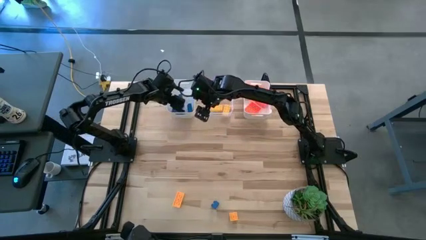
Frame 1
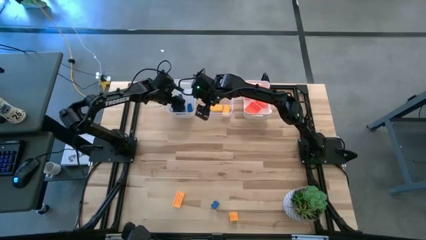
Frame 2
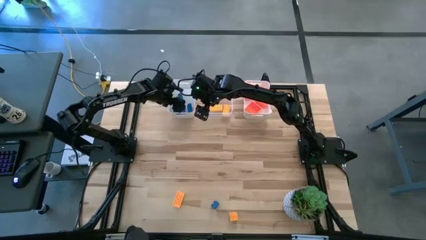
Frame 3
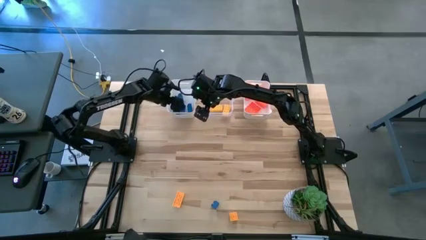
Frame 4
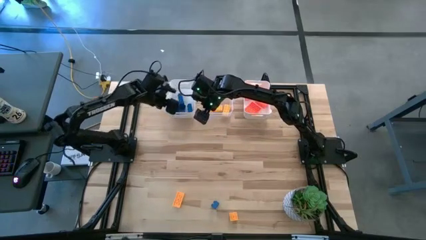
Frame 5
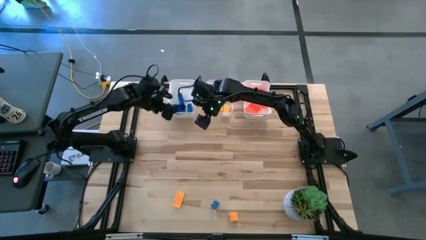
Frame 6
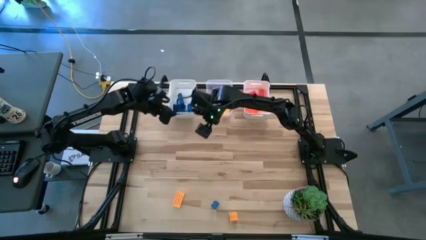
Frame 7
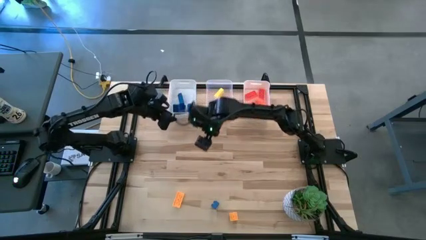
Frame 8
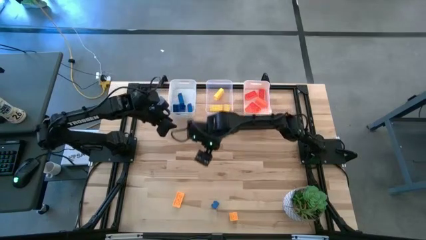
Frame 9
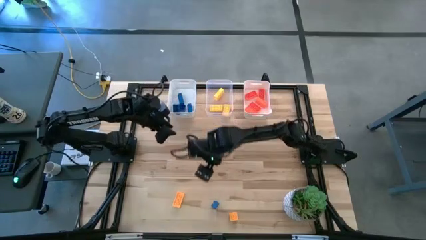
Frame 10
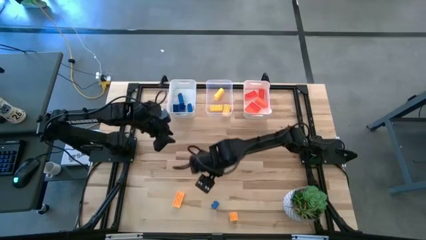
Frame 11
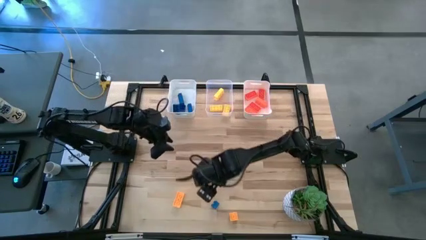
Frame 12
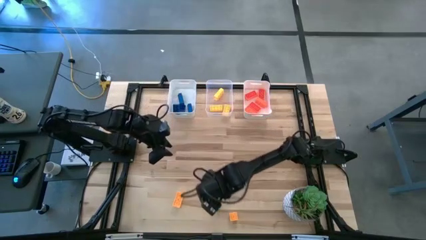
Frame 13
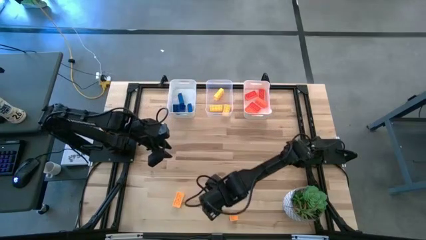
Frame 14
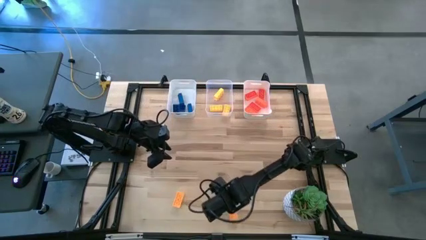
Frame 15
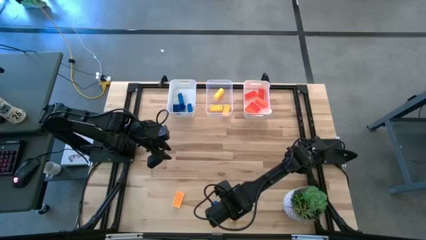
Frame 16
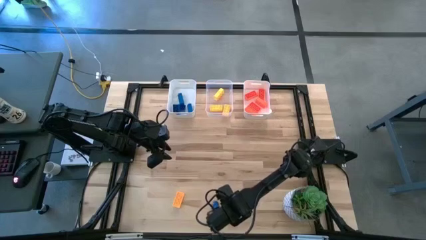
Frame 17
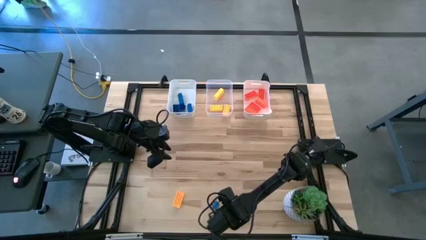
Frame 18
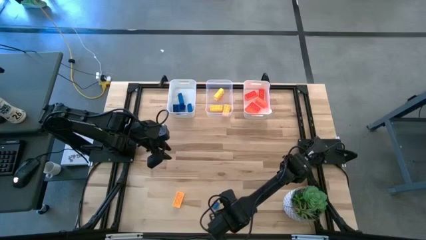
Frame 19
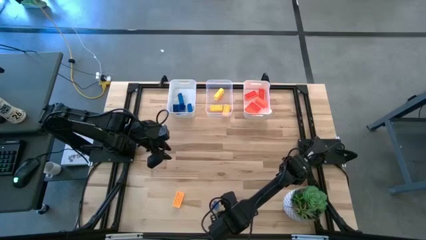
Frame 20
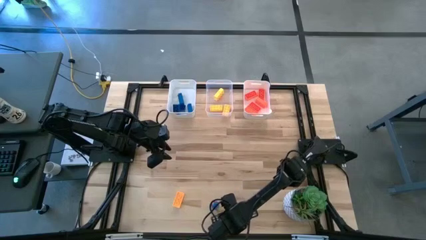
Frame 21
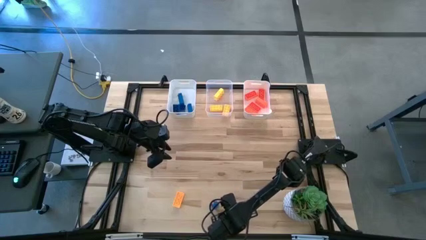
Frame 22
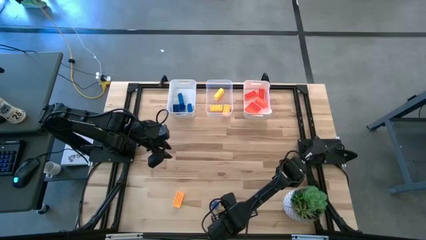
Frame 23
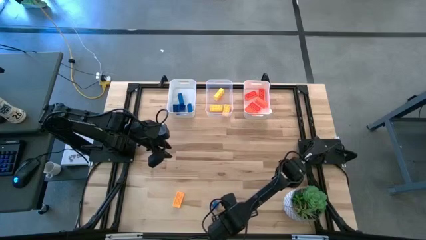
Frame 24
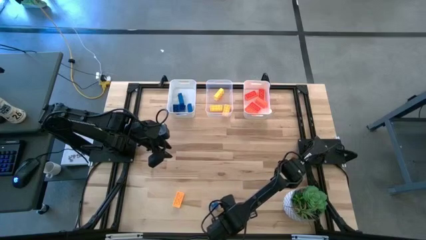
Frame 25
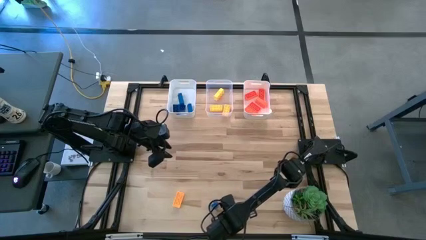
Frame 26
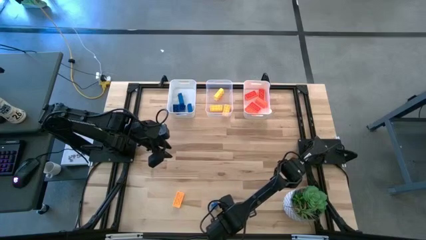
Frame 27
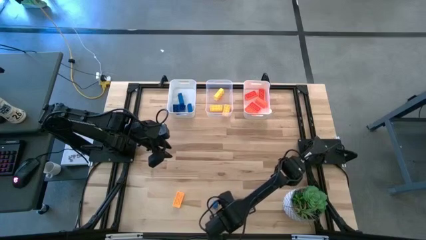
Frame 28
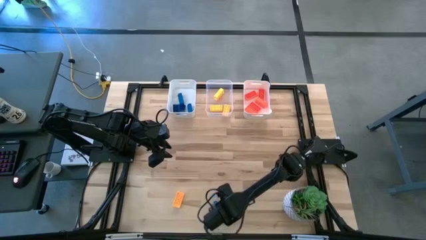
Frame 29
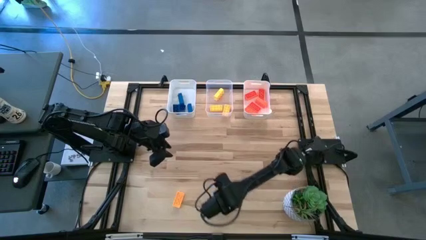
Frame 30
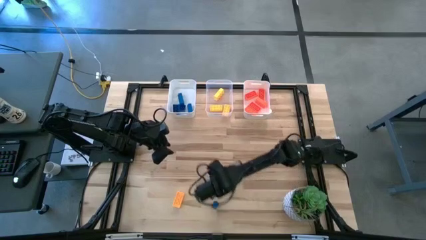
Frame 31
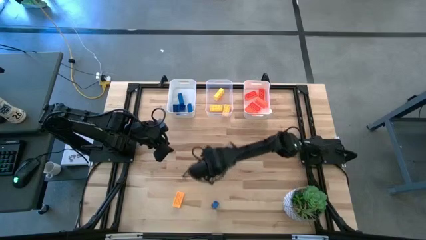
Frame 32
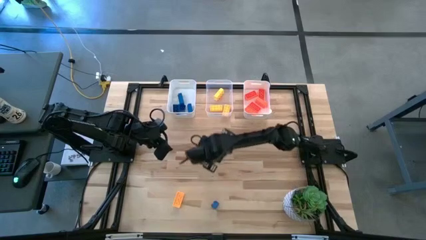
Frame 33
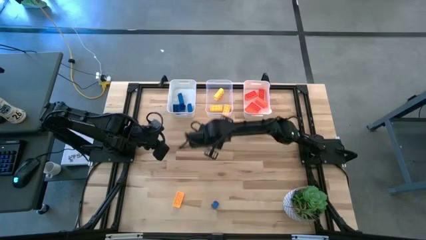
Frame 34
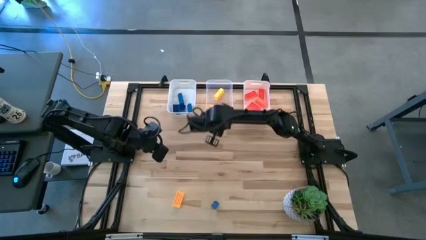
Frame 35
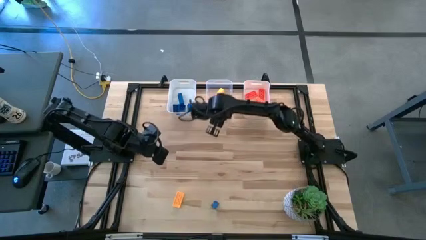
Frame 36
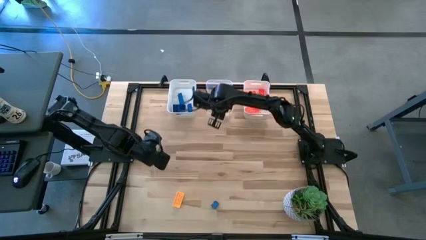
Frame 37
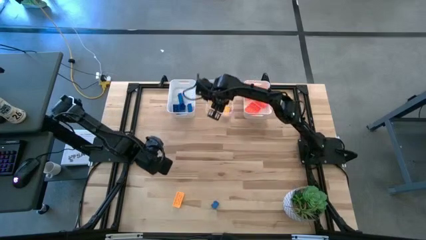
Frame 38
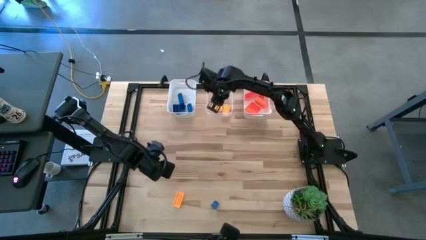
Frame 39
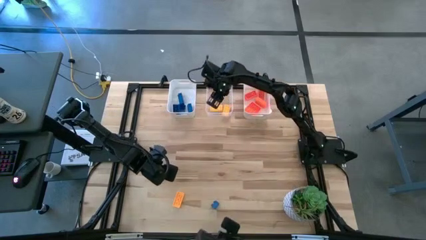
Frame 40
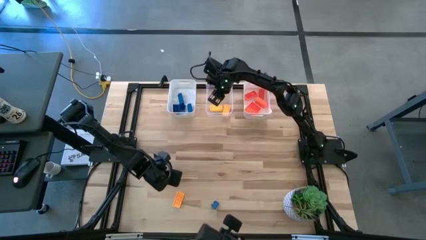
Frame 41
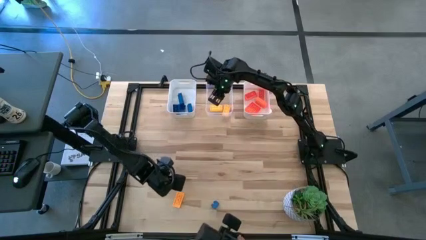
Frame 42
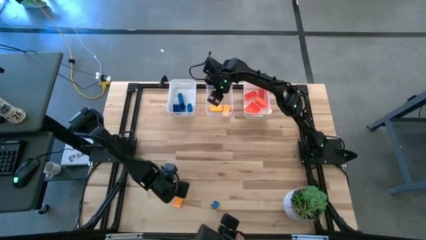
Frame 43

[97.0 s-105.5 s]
Task: Sort & place blocks by color
Put the yellow game piece into the transparent bin

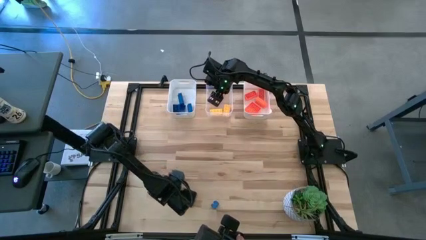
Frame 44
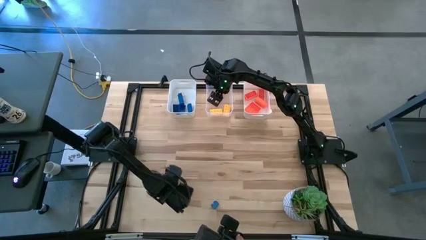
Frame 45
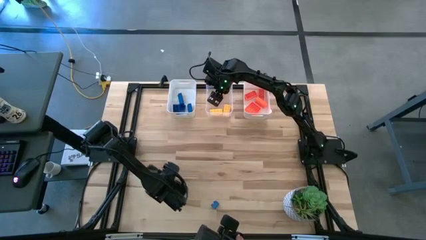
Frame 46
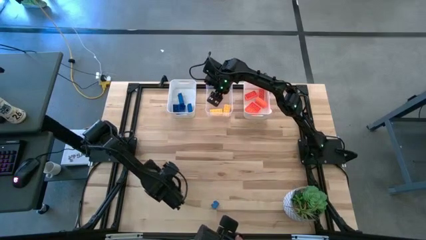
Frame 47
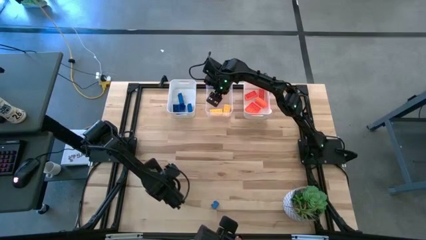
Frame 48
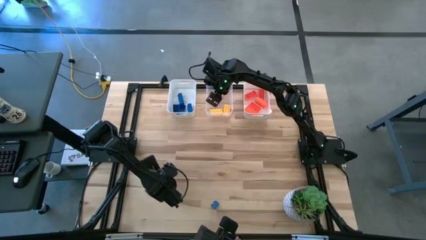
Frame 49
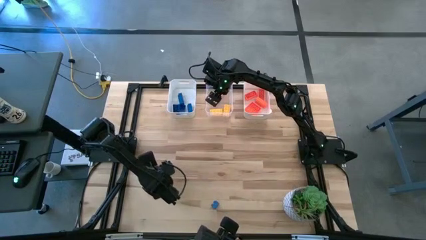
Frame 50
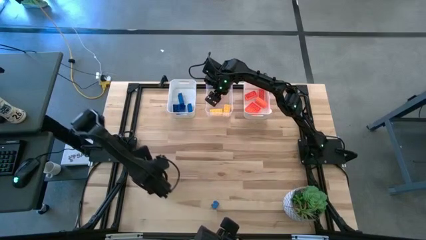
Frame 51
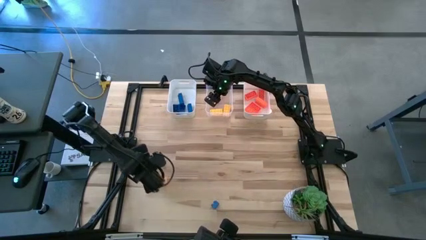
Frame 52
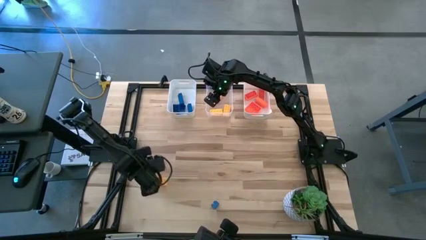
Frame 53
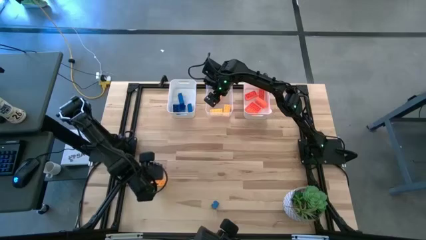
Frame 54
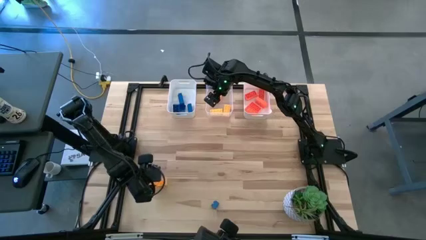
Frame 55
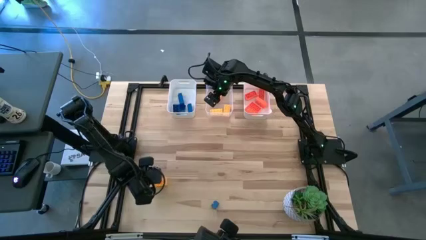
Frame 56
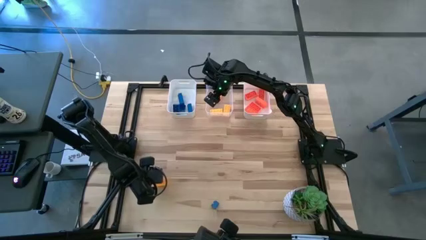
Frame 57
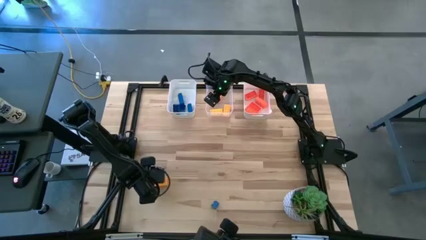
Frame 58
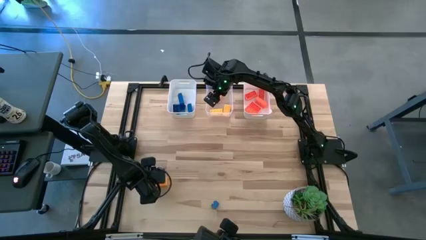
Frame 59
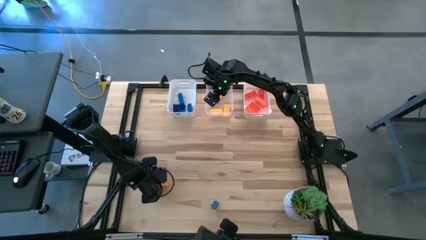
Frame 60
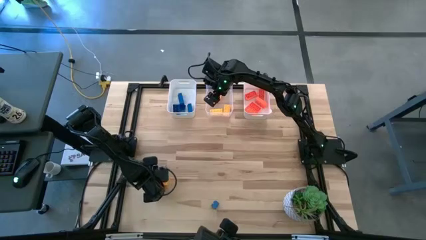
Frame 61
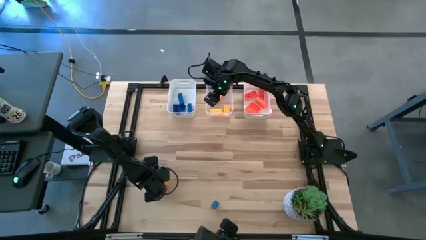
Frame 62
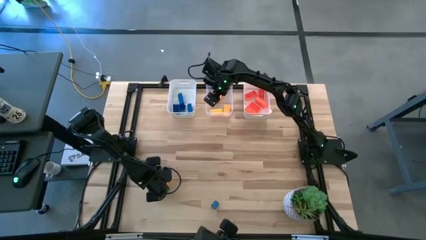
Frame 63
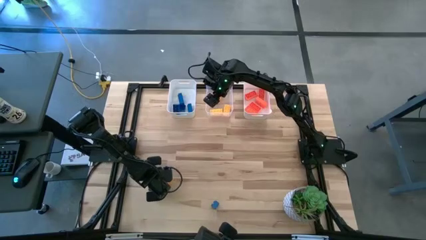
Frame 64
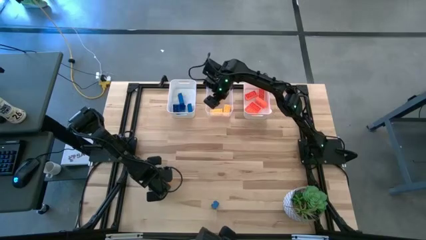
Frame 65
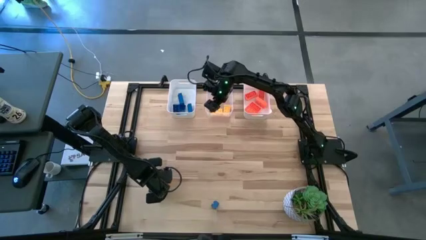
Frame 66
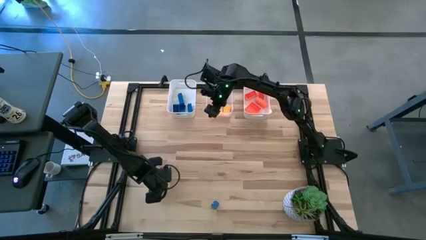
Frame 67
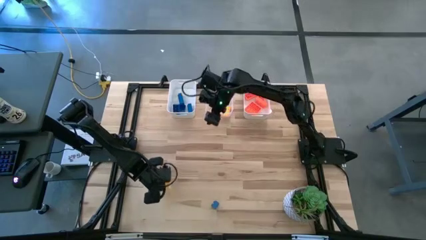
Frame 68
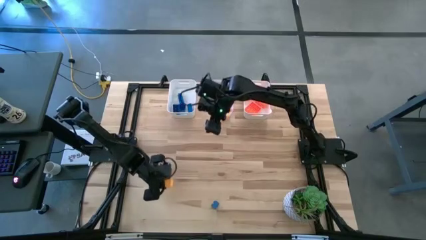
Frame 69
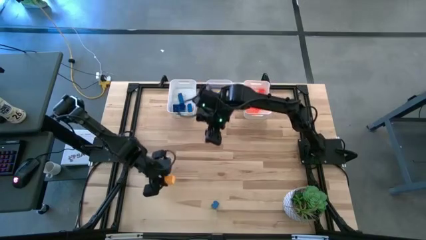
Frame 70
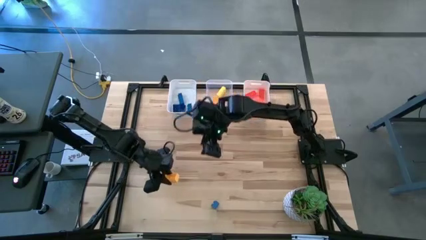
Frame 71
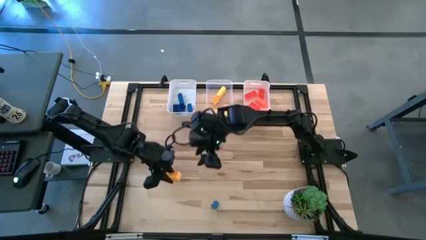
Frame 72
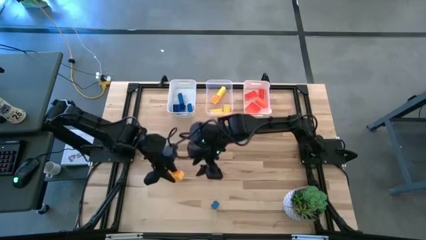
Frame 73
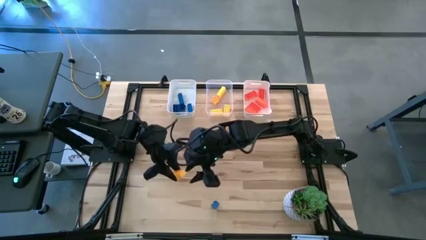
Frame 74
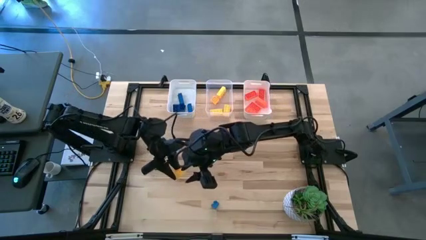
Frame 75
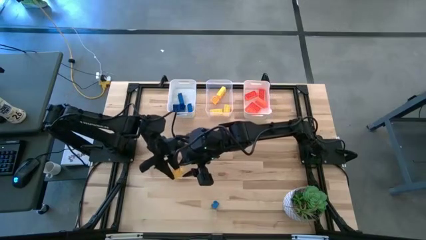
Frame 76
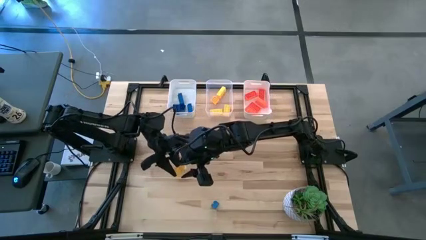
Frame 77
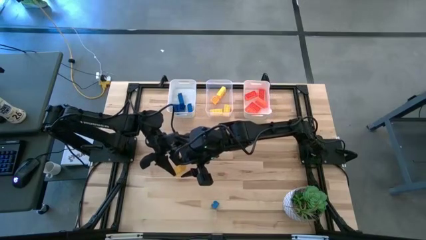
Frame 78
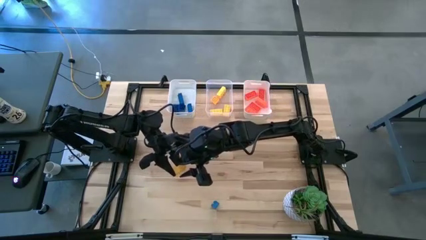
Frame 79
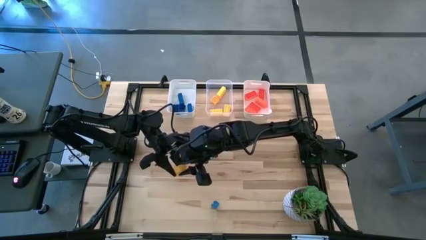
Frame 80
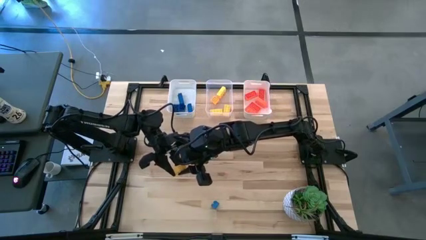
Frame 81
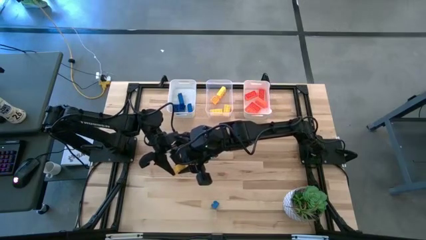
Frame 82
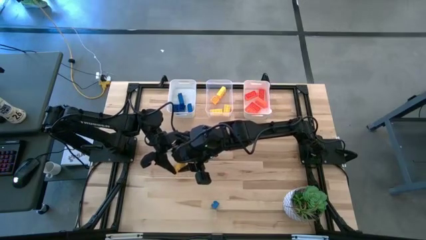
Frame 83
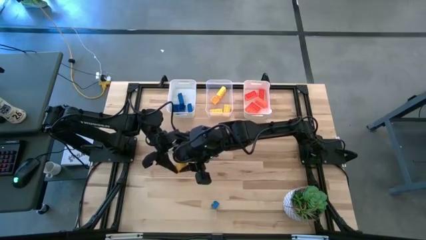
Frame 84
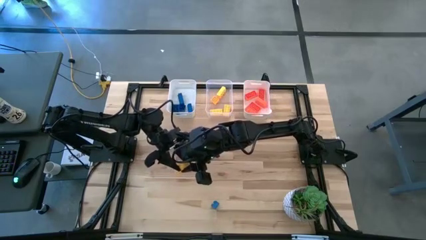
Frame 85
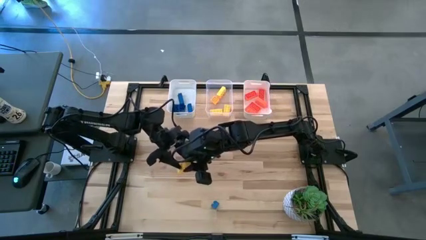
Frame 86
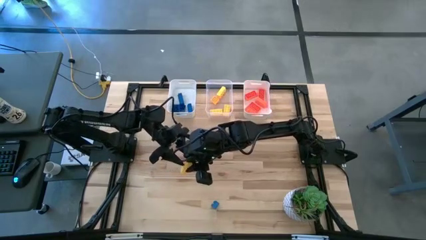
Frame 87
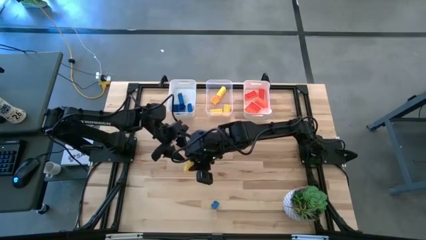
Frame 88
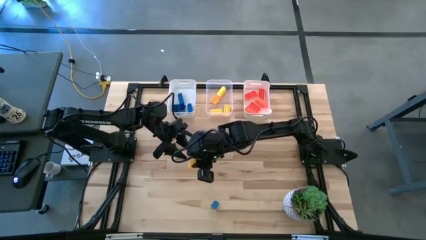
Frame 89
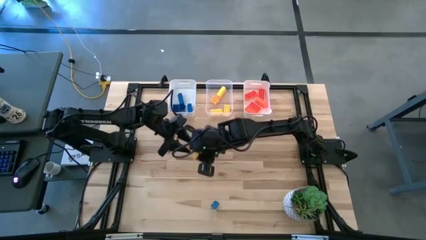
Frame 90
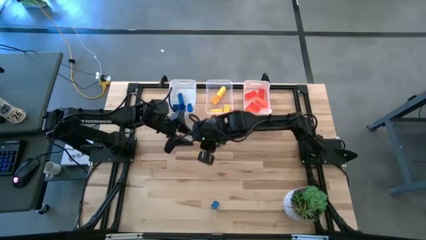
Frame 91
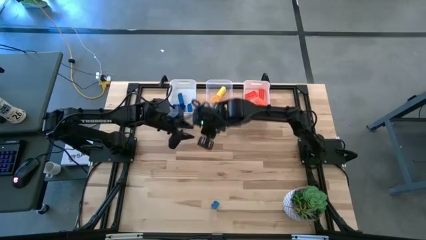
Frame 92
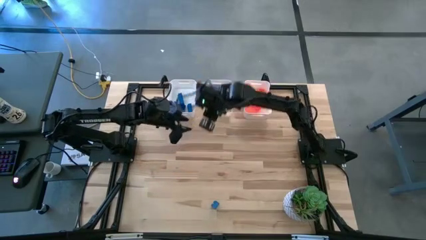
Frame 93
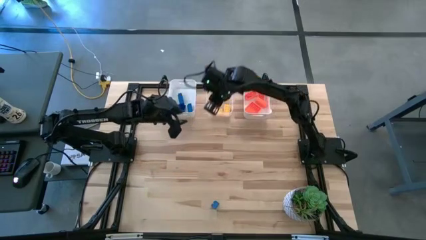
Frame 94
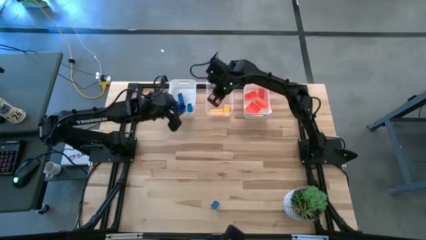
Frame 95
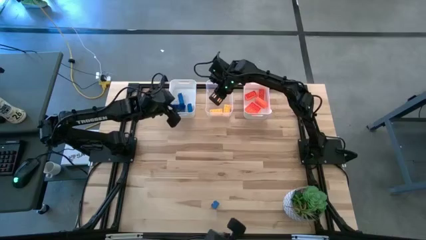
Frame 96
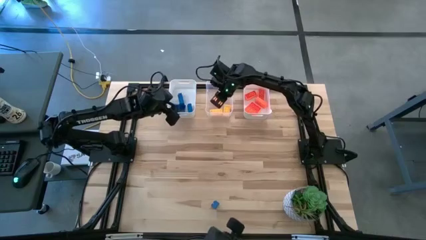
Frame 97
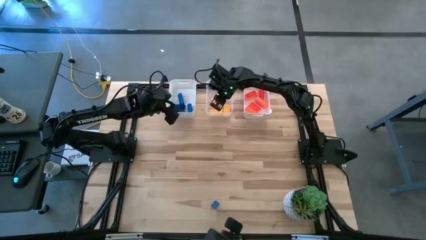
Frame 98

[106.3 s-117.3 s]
Put the yellow game piece into the transparent bin
